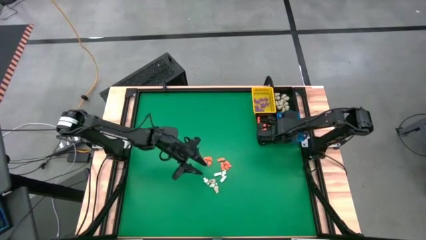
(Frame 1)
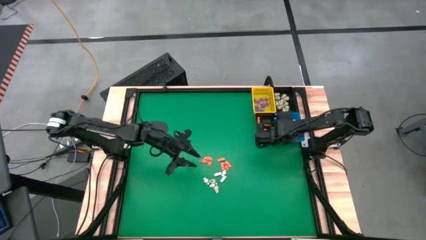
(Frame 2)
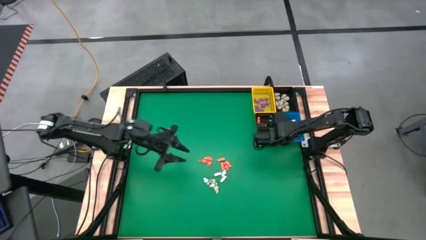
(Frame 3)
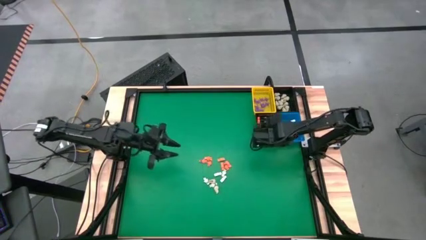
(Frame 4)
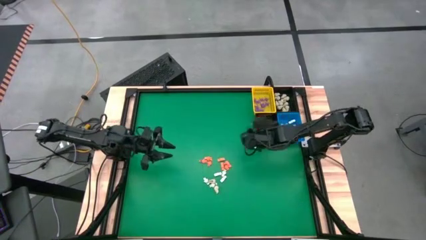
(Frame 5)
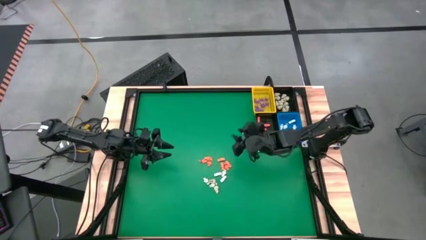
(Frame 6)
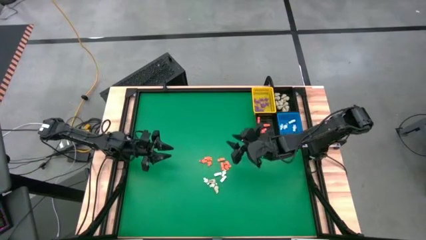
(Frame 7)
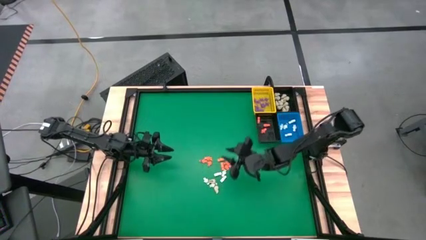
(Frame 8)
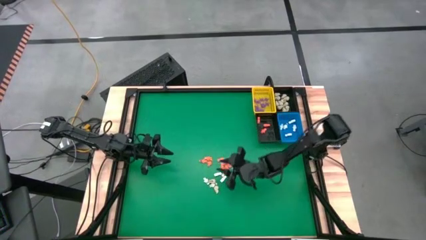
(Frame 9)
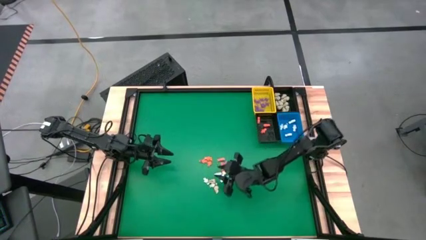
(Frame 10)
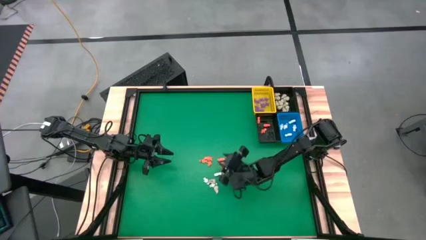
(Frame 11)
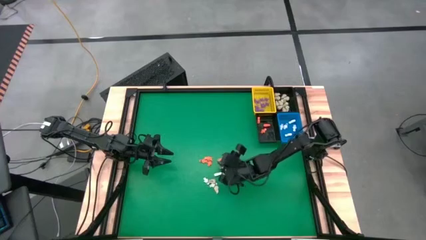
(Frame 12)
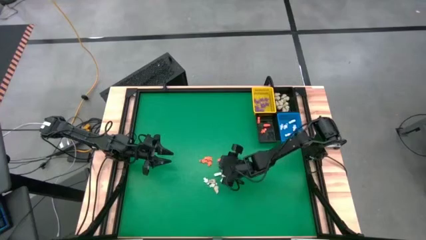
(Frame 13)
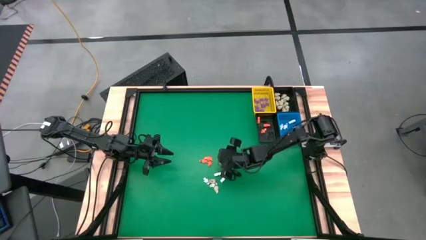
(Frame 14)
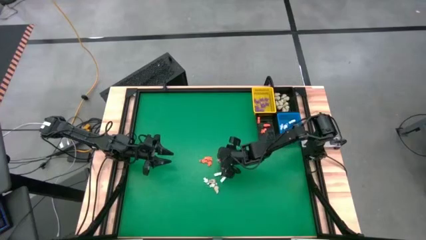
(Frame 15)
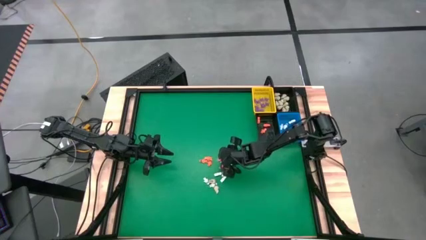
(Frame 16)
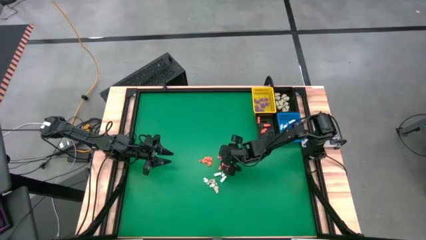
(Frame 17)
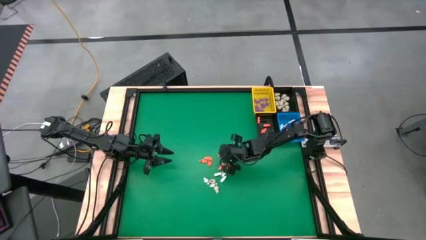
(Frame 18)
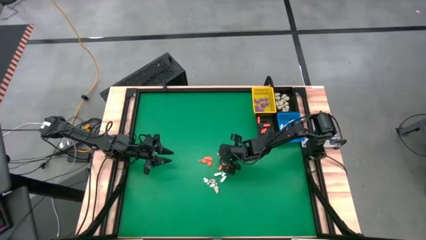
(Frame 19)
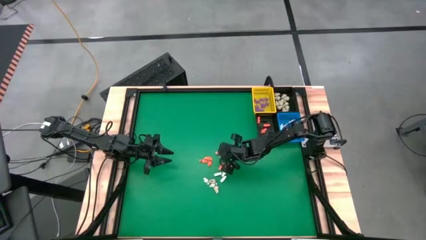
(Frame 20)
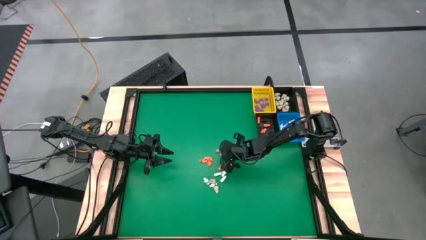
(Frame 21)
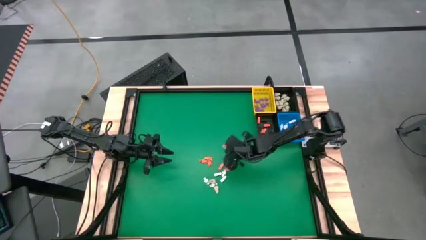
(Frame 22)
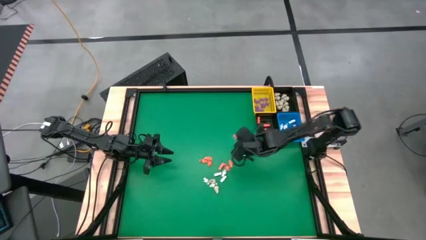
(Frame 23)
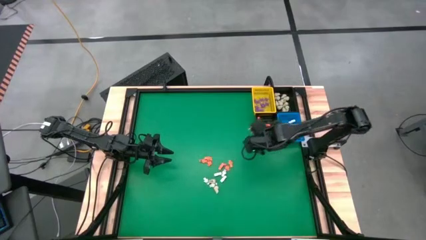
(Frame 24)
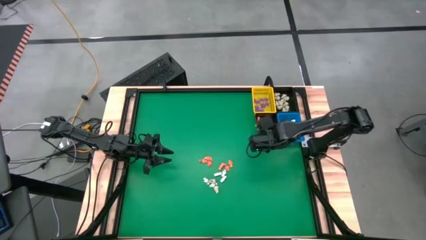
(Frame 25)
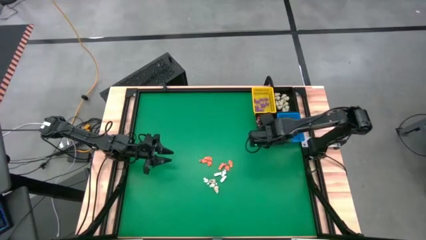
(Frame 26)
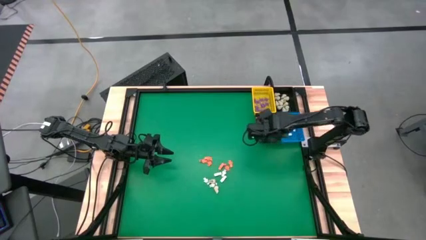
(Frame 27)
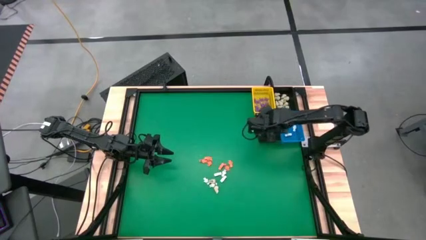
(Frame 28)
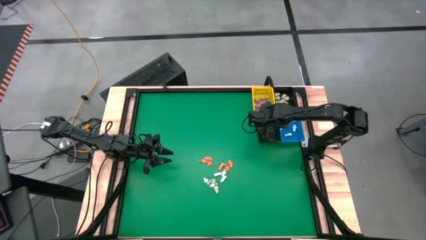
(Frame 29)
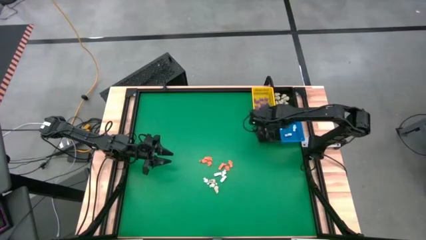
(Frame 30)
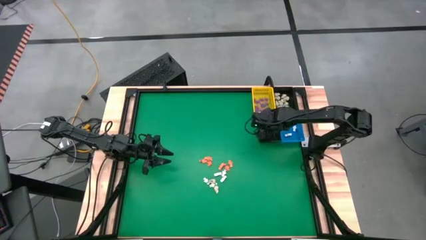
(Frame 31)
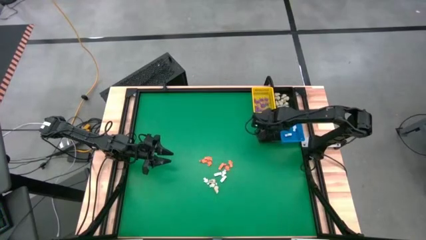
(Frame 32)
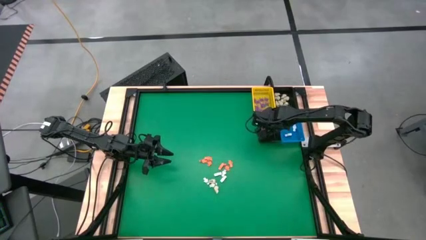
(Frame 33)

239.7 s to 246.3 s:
Task: Sort Halloween decoration
Put the orange skeleton toy into the bottom black basket

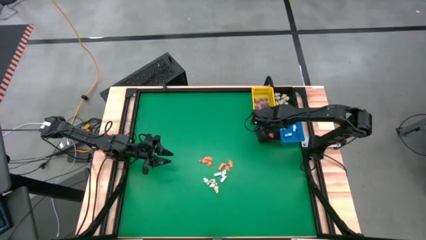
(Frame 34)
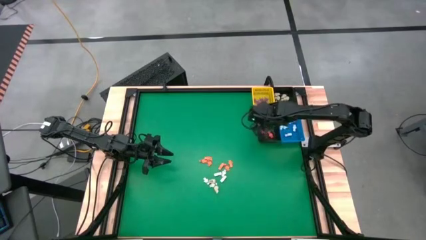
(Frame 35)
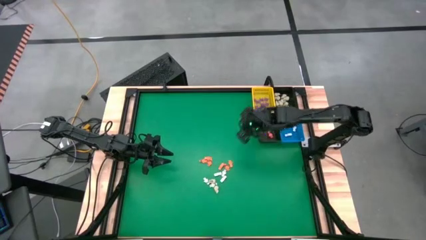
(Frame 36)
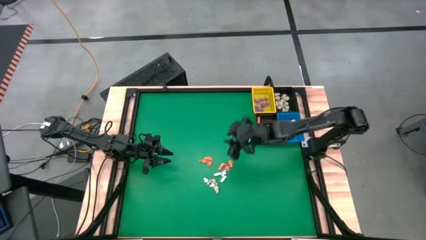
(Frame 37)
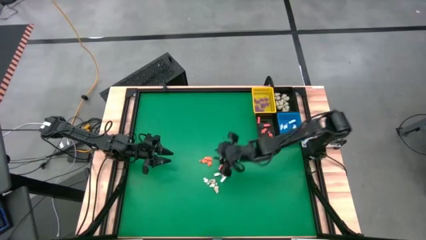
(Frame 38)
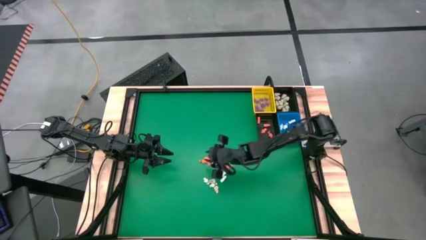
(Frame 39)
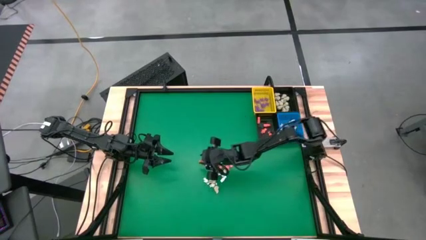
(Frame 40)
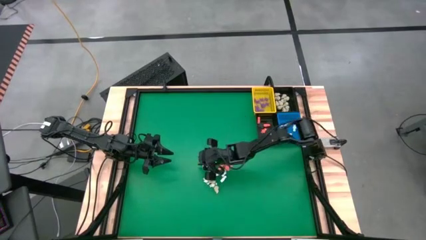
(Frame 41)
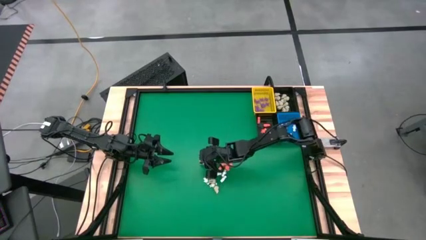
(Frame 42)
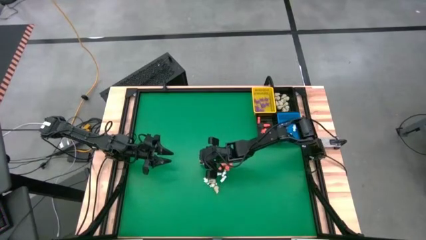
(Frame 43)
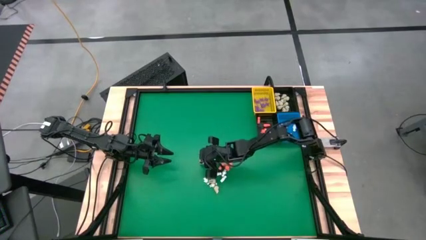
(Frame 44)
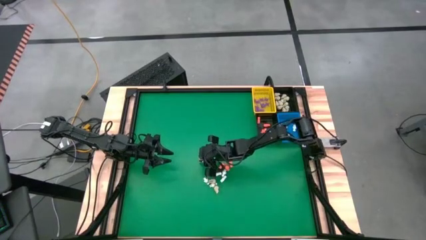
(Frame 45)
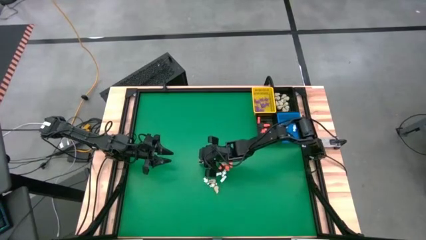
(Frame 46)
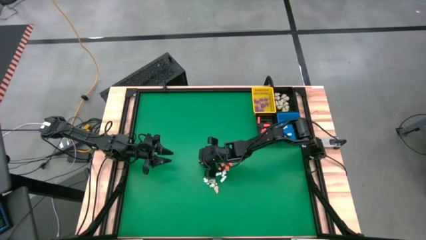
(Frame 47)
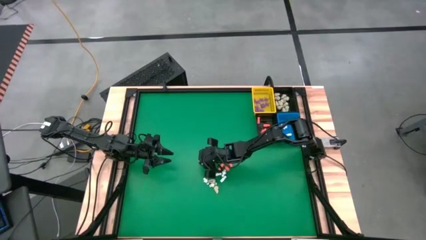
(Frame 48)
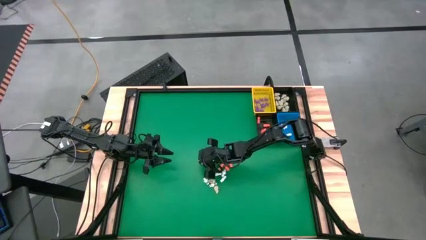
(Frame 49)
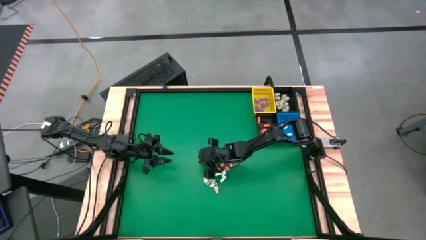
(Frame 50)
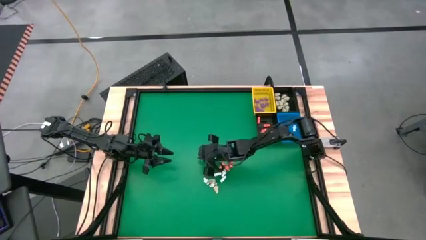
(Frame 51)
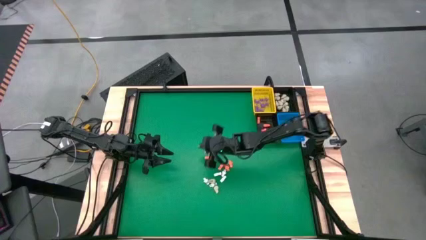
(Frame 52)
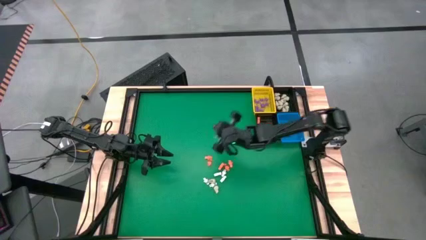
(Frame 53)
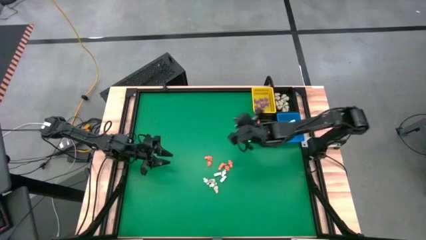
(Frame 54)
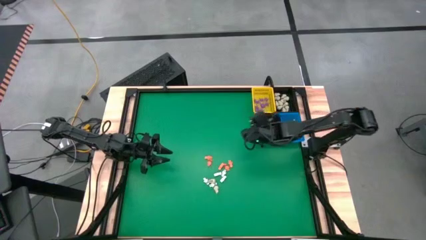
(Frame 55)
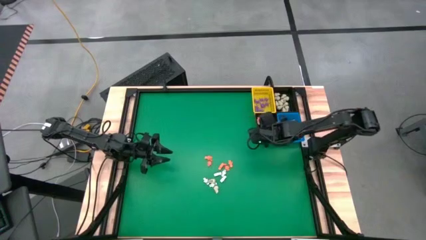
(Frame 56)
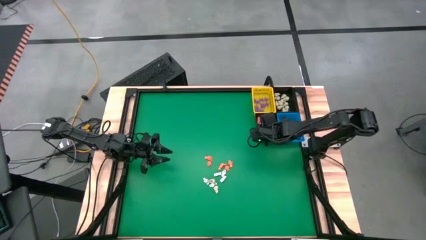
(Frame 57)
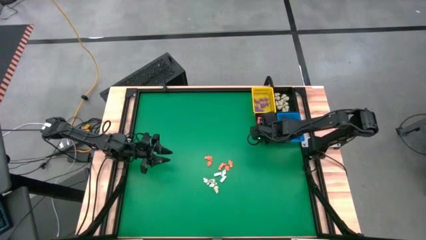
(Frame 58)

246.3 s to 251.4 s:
Put the orange skeleton toy into the bottom black basket

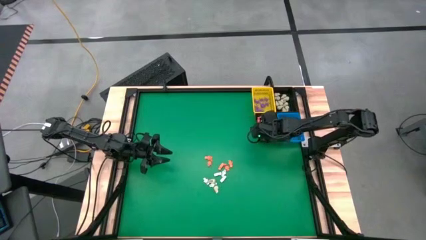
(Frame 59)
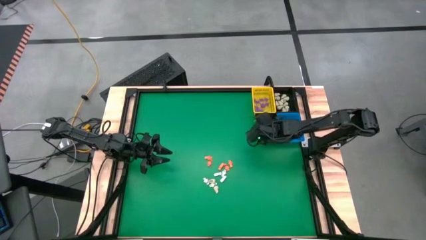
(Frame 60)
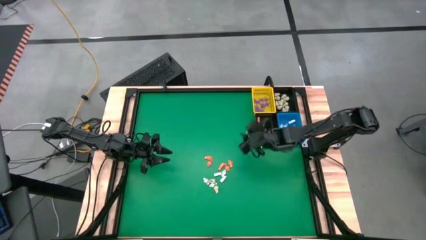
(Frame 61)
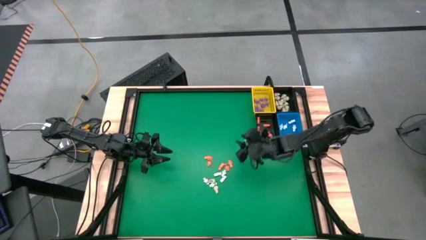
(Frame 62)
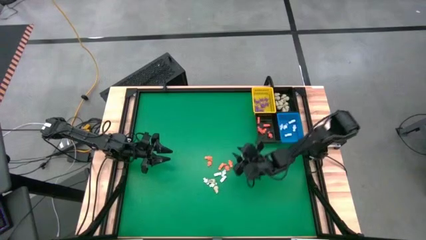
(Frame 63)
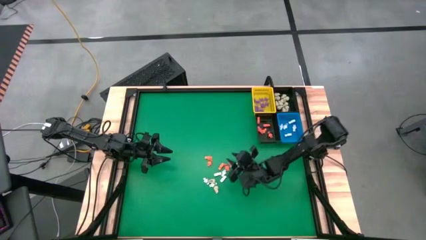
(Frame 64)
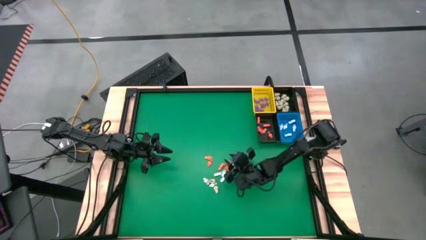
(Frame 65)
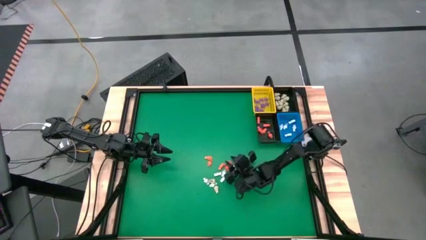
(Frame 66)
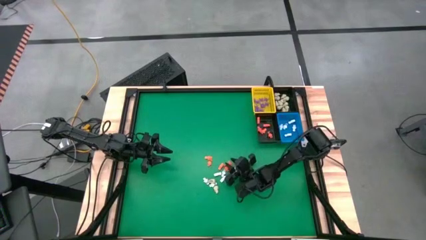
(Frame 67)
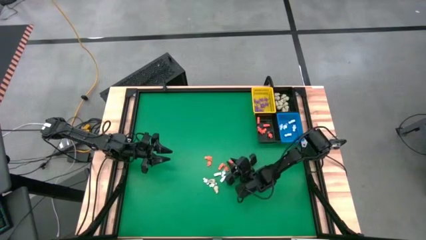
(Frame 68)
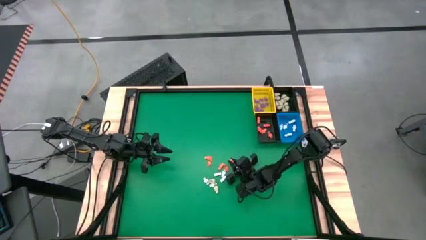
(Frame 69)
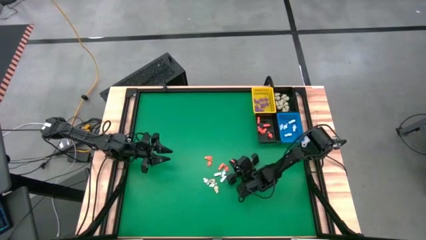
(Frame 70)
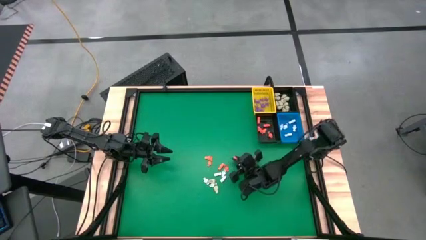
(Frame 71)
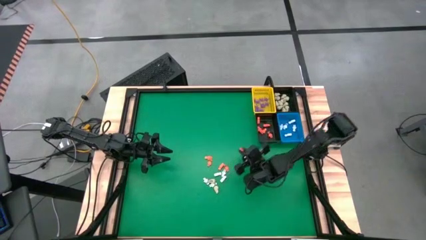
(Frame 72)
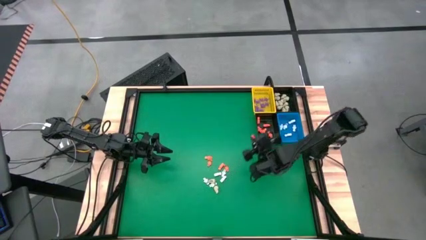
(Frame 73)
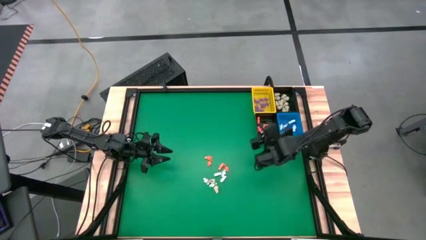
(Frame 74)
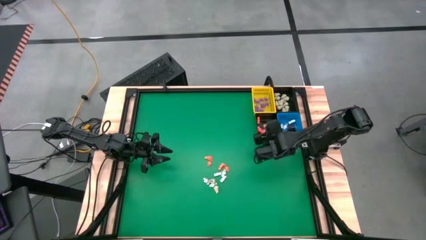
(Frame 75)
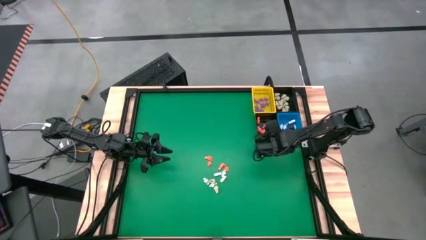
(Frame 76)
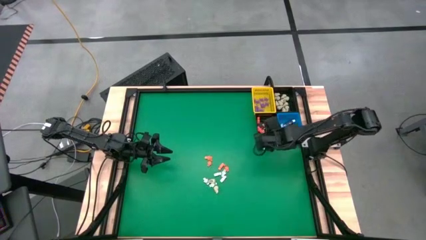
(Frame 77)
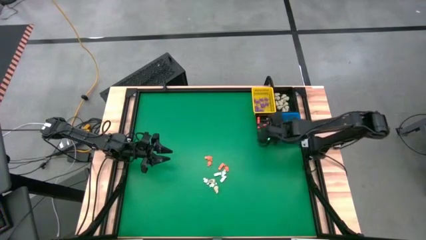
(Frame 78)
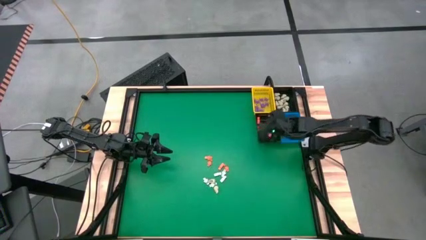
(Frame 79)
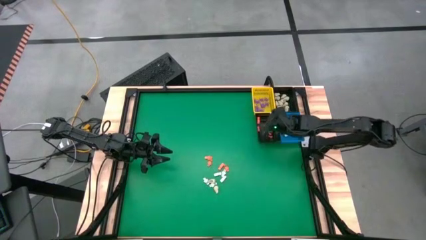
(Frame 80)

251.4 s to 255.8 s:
Put the orange skeleton toy into the bottom black basket
